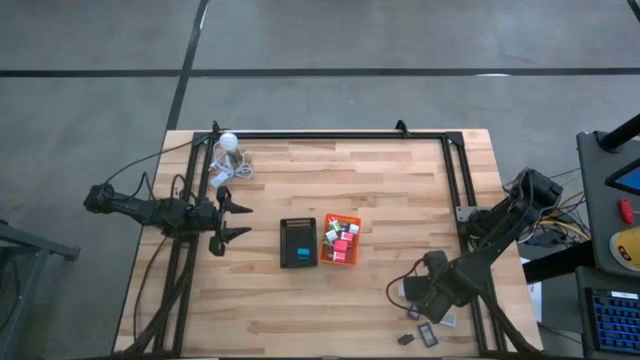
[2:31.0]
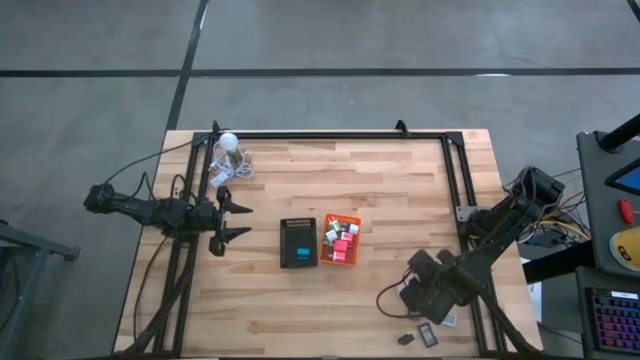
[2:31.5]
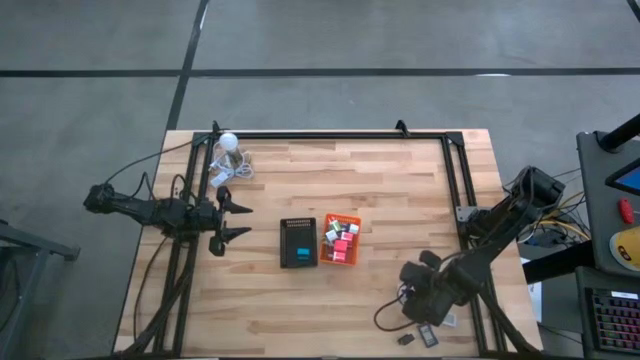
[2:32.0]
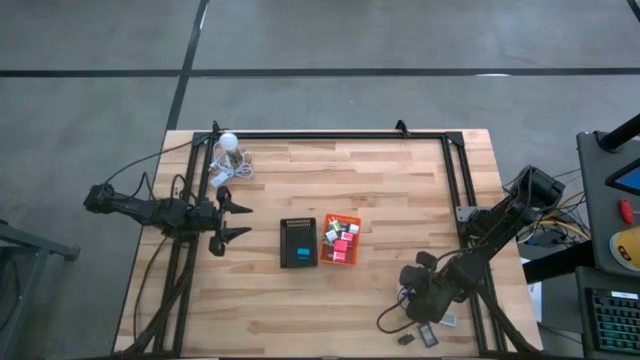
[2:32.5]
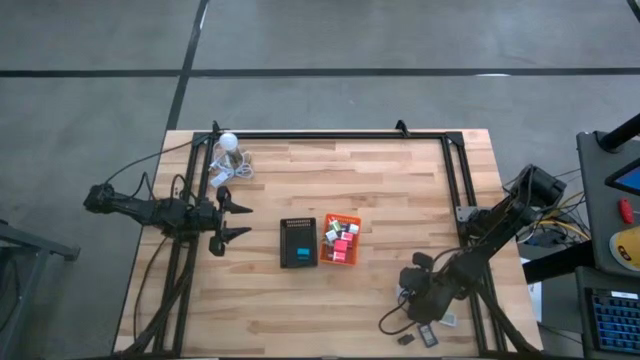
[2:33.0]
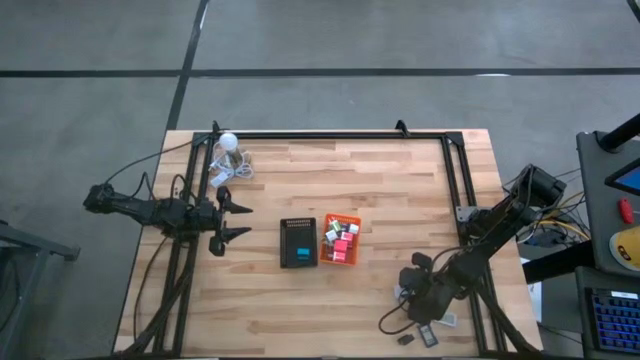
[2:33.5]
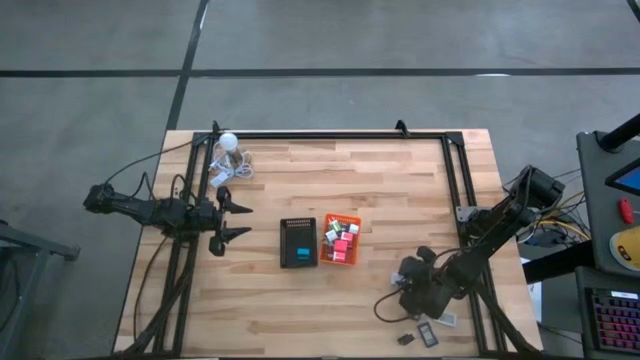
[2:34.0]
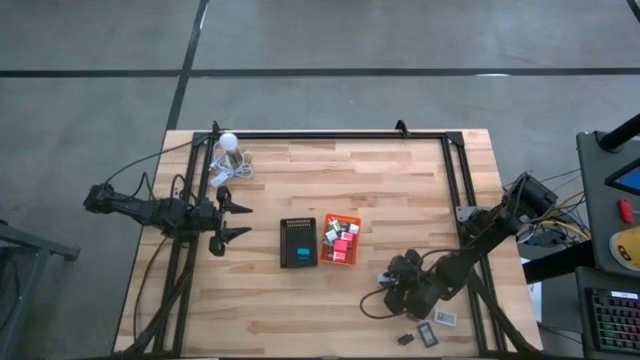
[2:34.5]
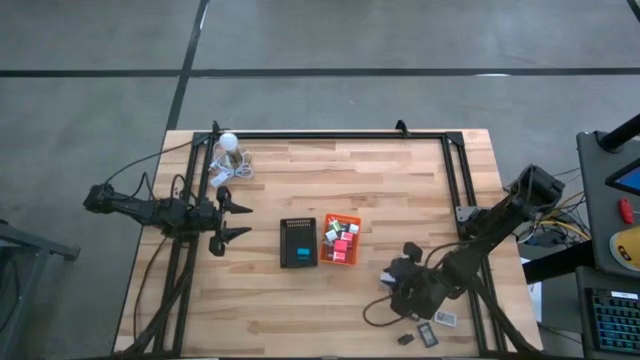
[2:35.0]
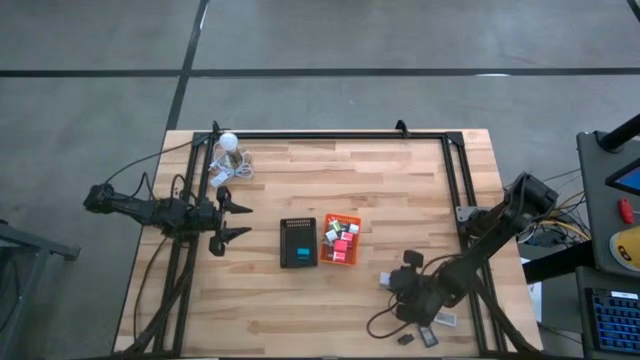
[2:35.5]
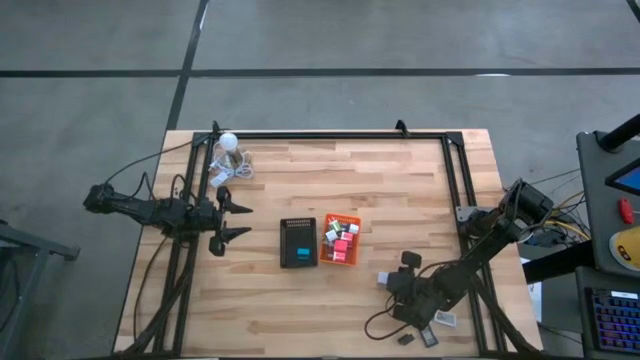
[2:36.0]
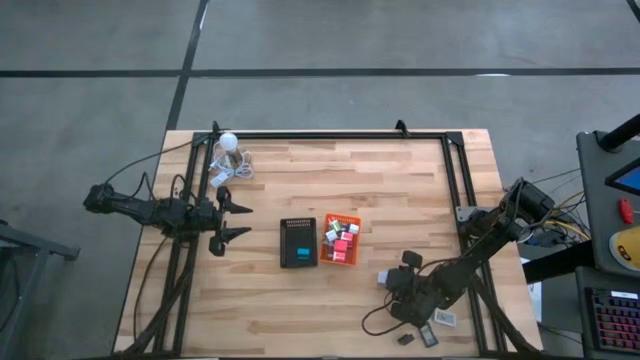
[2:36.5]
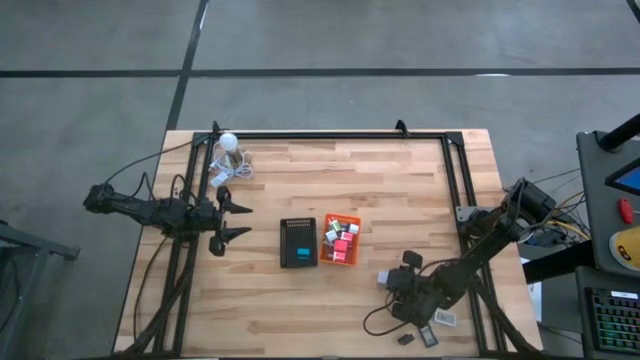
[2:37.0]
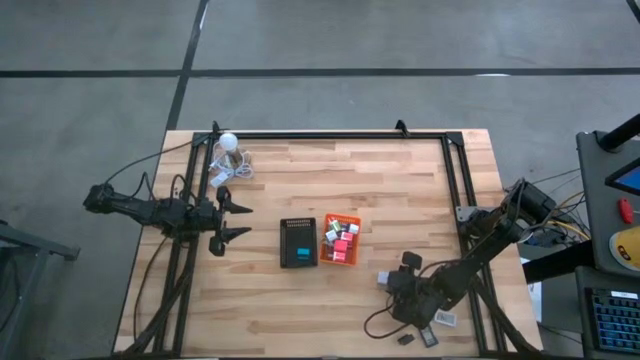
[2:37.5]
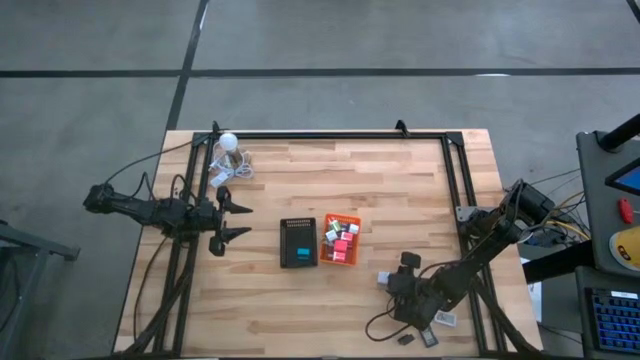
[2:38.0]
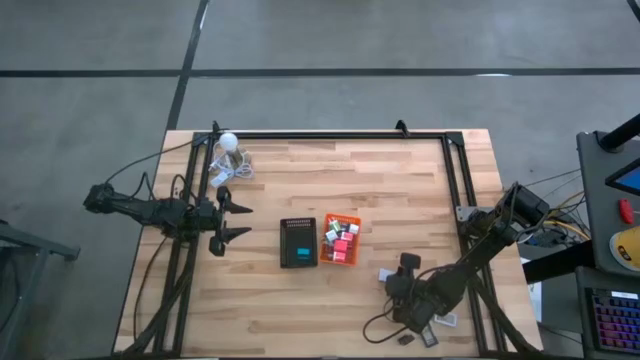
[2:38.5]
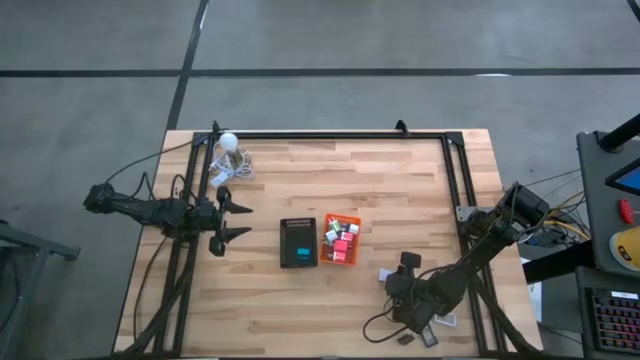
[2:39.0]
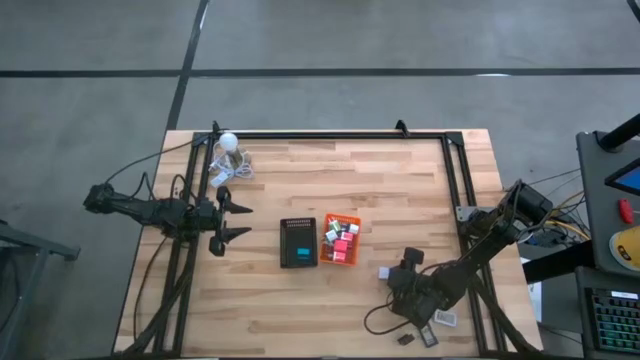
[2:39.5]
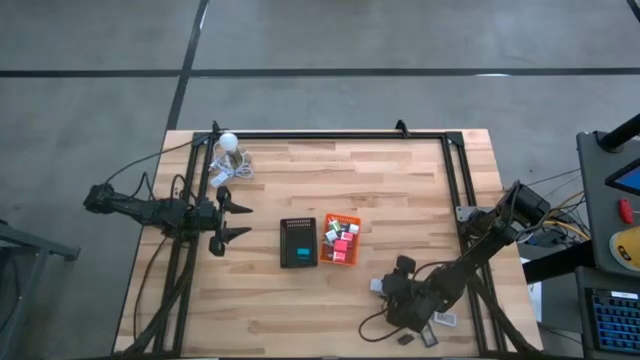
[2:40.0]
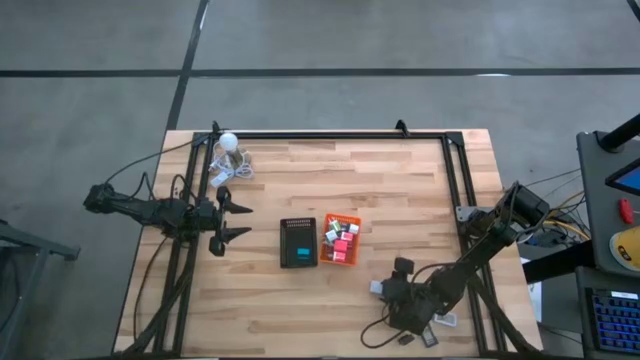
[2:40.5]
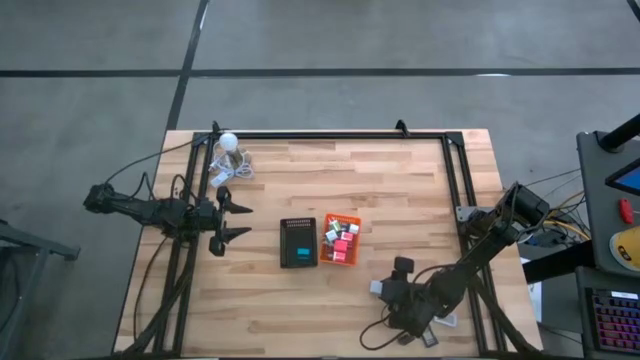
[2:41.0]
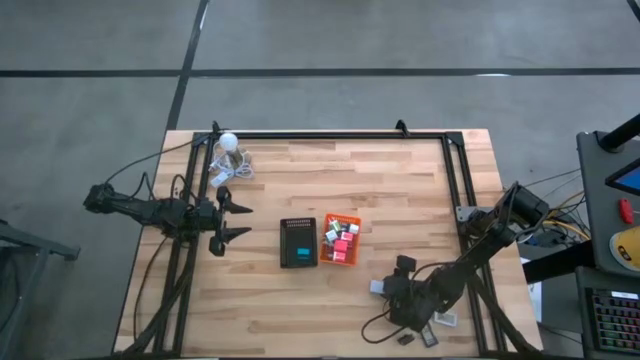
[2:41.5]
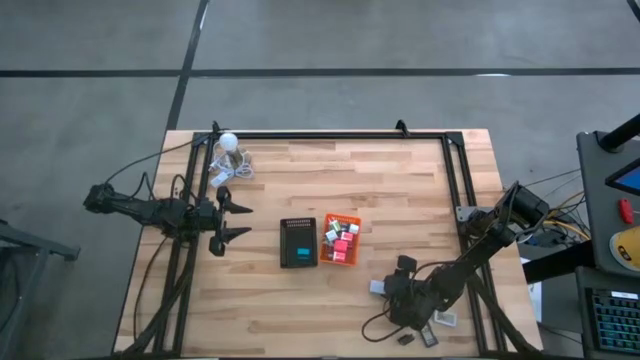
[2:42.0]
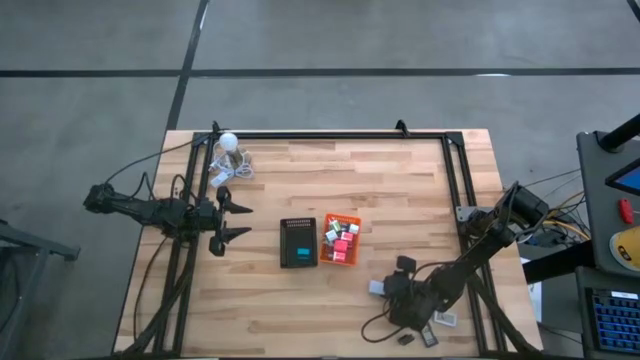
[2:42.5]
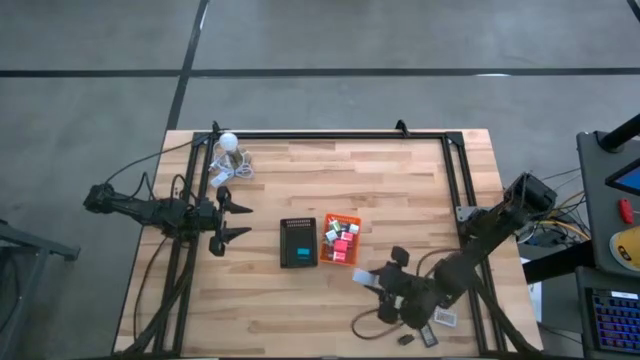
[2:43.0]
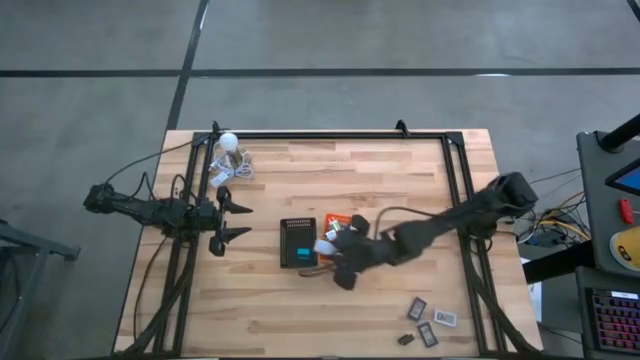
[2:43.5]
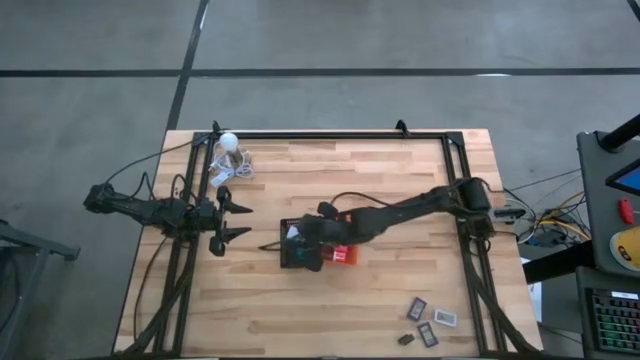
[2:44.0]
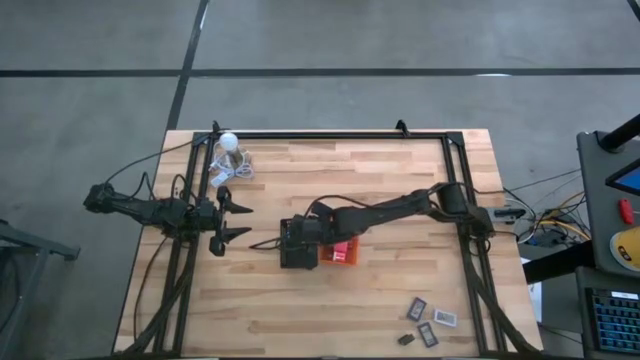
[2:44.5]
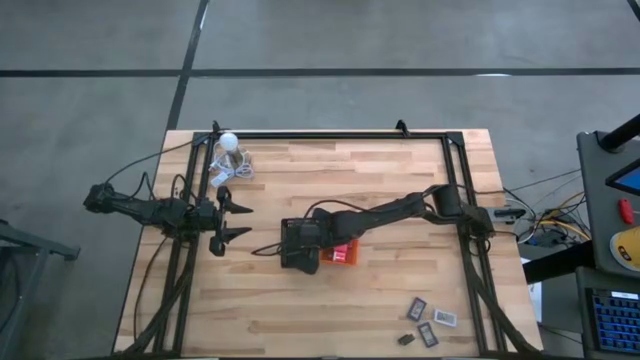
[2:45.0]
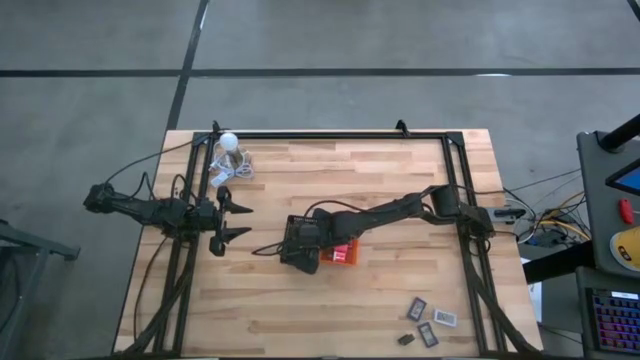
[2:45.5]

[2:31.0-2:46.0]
Task: Pick & Place Office items
Put the top white timer into the black bin

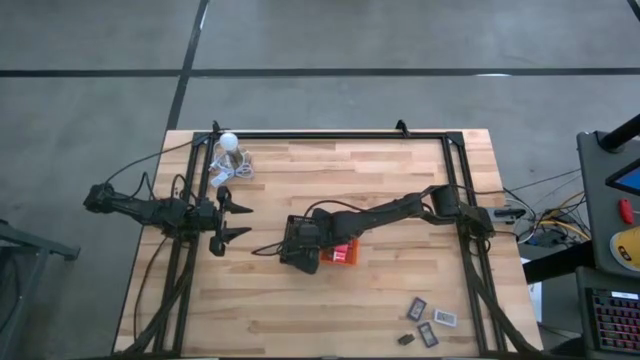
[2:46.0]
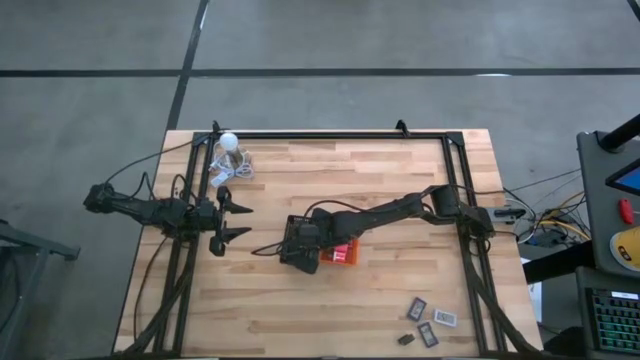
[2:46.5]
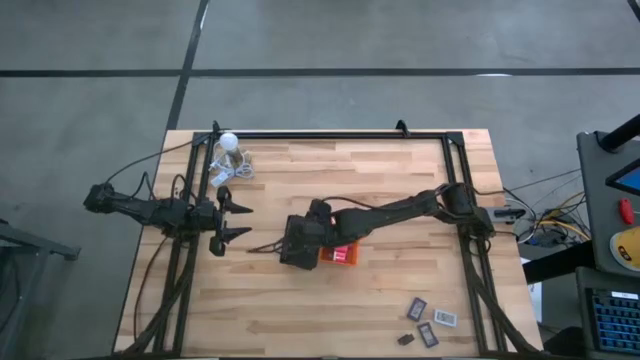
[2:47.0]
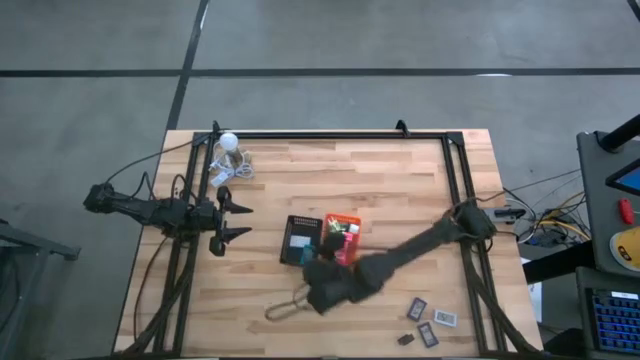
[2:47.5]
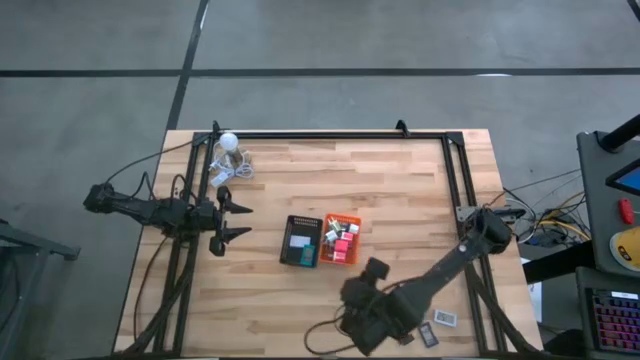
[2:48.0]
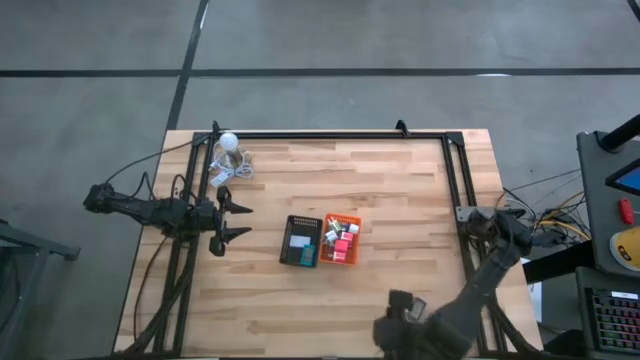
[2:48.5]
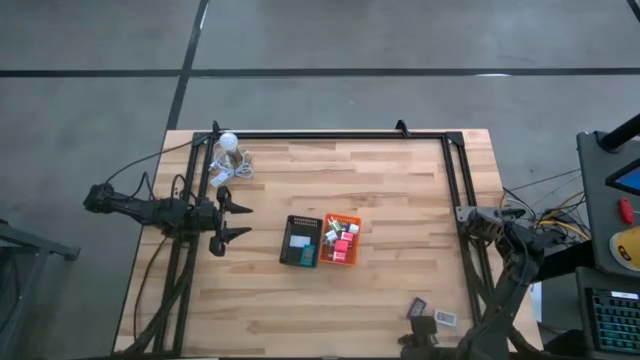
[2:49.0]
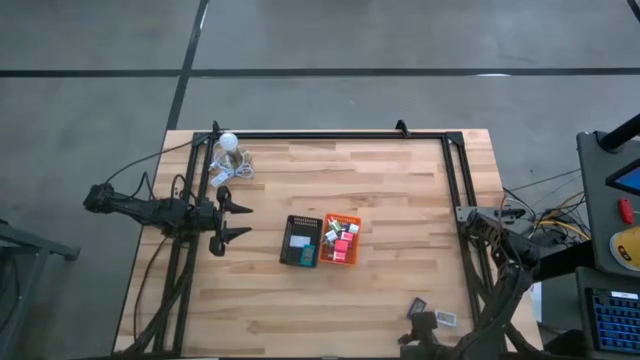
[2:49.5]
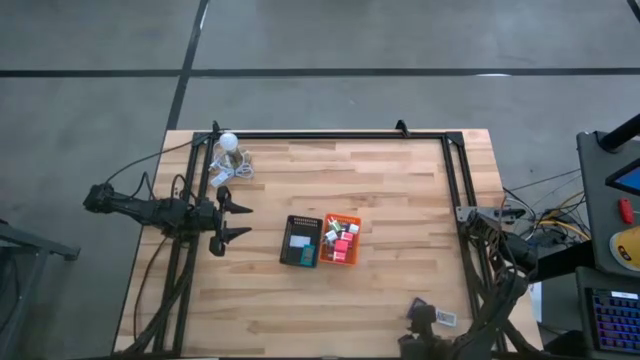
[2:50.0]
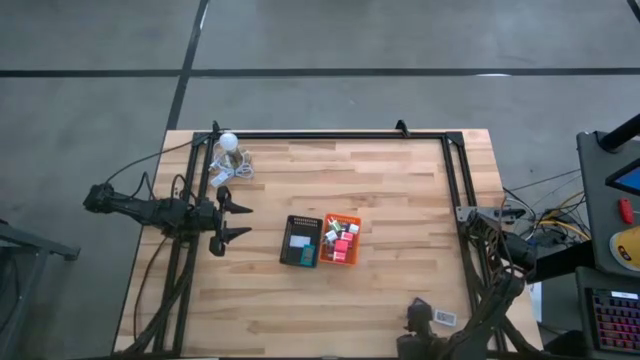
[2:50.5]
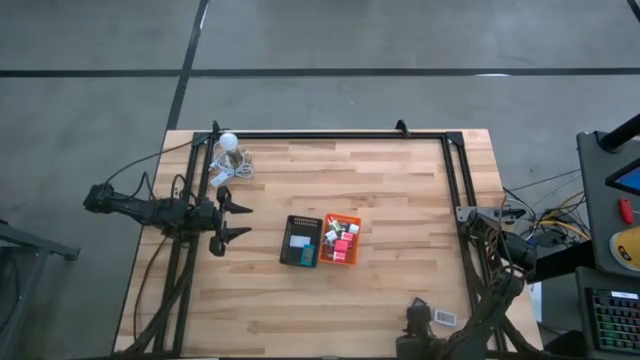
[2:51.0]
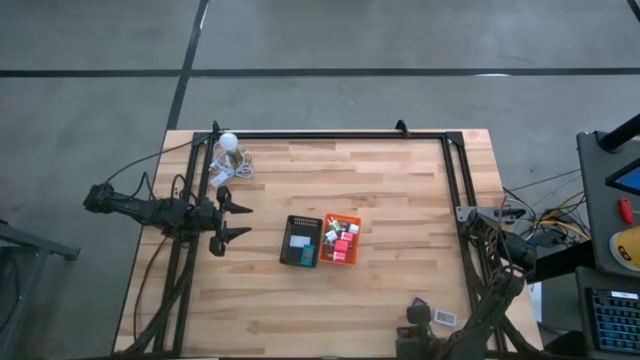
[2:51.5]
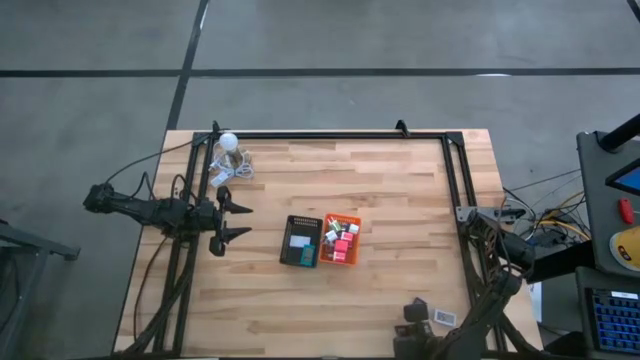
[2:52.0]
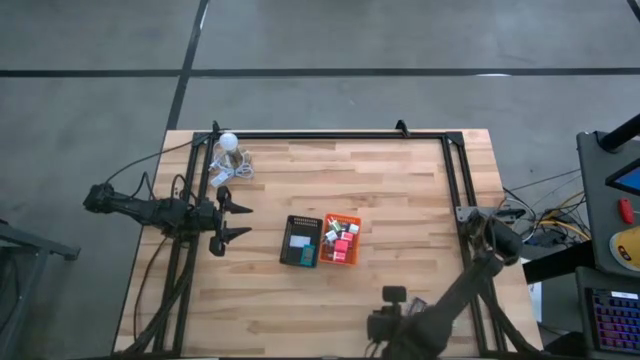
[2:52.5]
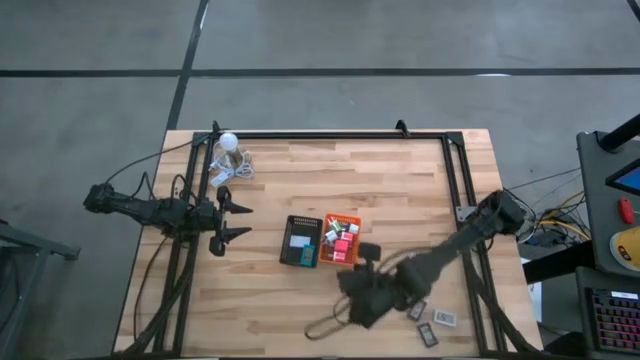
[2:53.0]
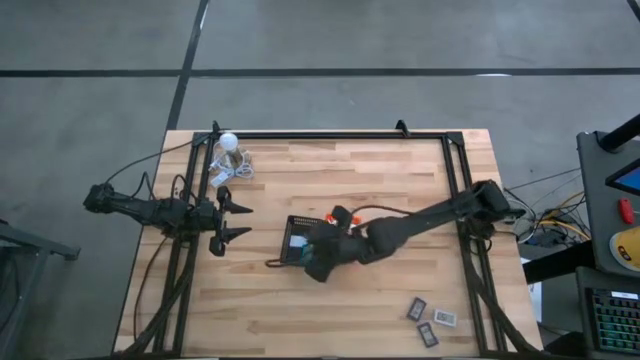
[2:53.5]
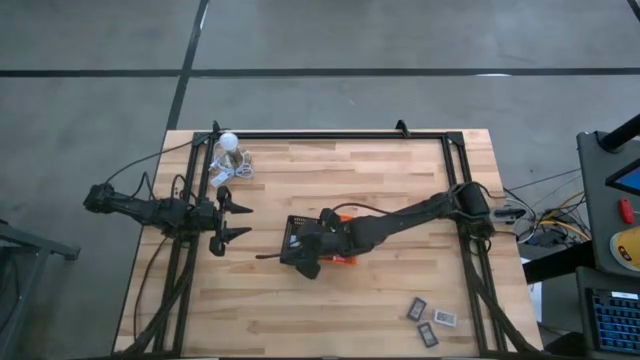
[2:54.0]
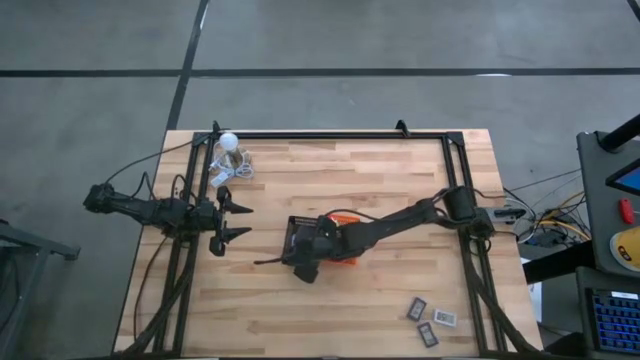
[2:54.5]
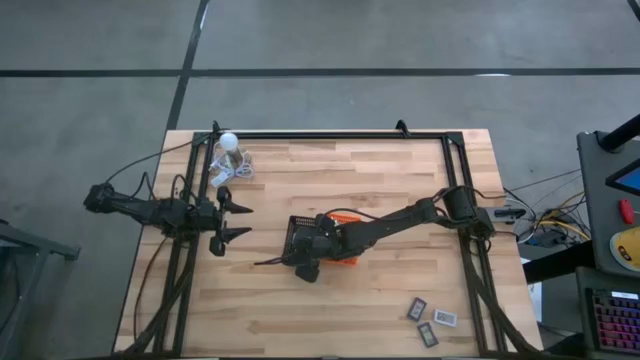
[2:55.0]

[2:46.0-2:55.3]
Put the black timer into the black bin
